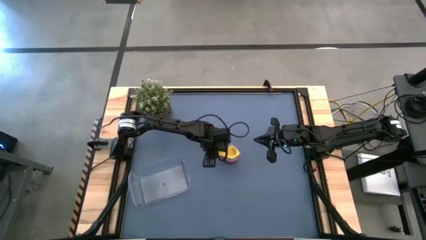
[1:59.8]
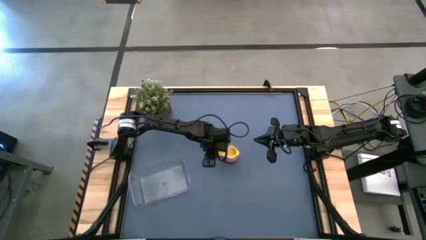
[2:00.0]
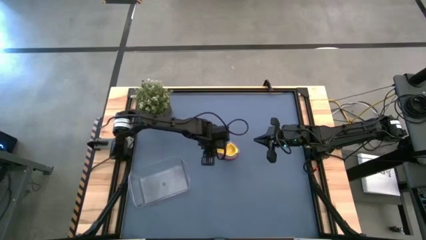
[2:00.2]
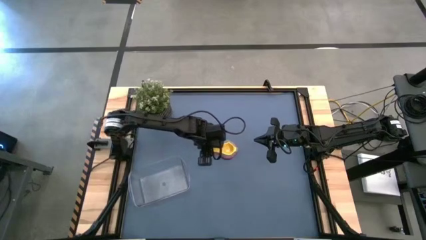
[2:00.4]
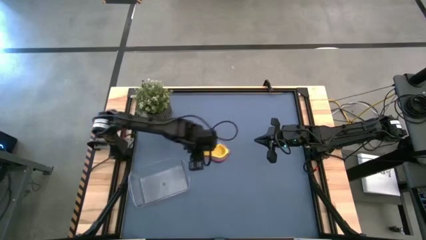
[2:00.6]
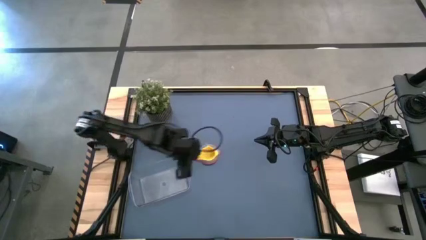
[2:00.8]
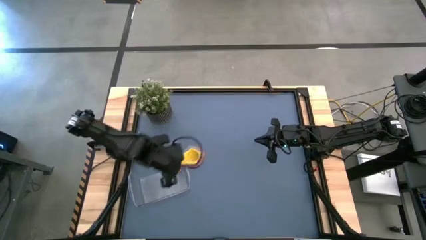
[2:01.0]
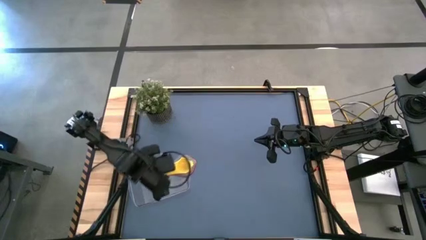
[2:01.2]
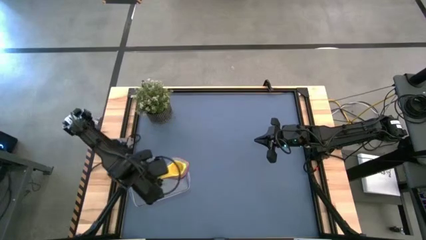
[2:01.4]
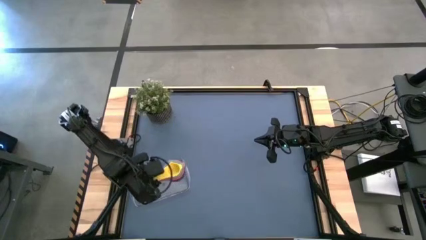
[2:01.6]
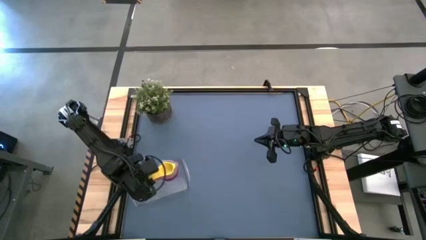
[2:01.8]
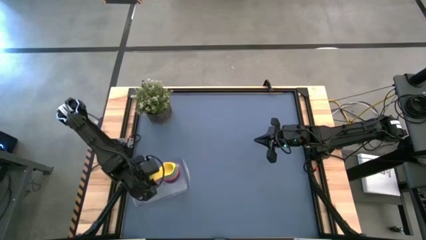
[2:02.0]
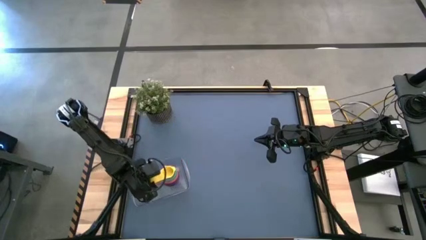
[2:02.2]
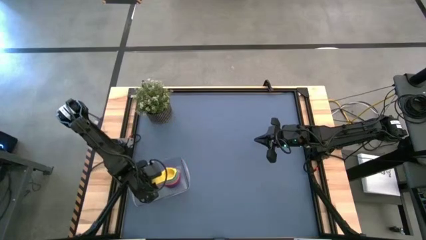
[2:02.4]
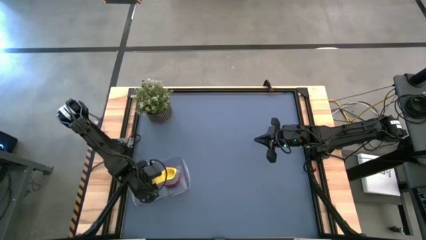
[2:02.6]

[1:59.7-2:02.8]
Task: Nest measuring cups in basket
Put the stacked measuring cups into the transparent bin

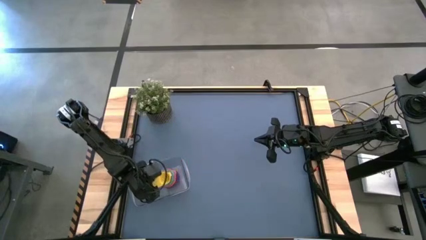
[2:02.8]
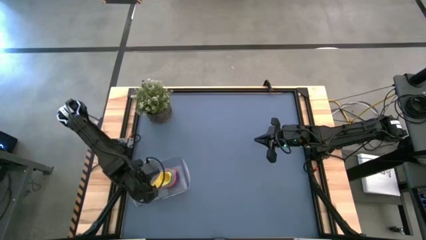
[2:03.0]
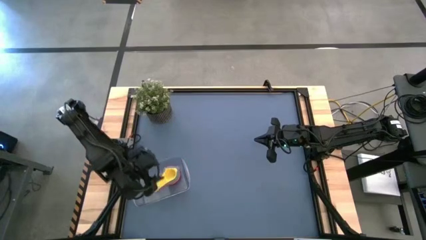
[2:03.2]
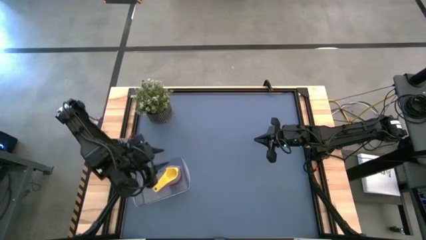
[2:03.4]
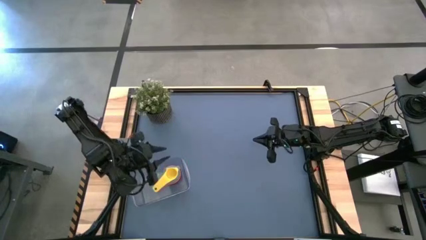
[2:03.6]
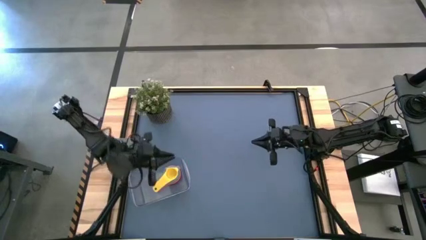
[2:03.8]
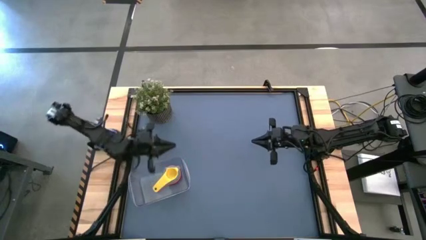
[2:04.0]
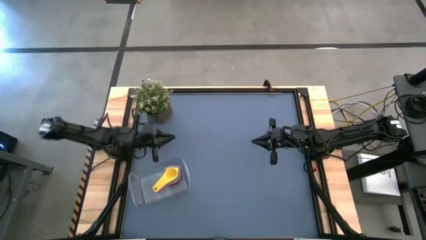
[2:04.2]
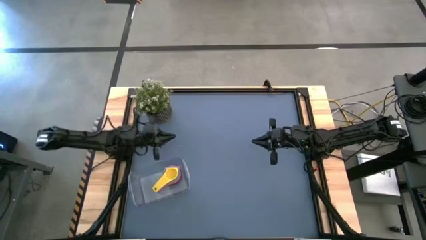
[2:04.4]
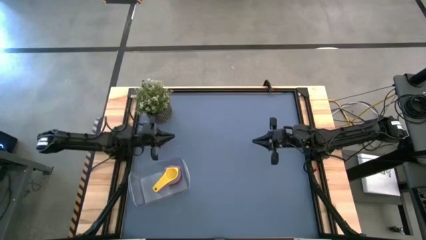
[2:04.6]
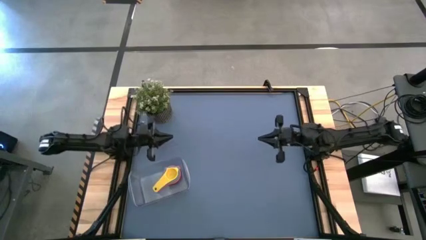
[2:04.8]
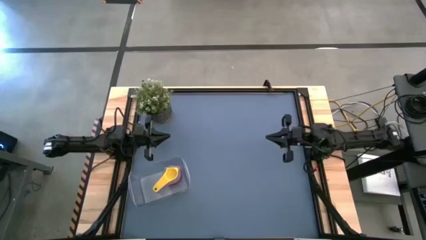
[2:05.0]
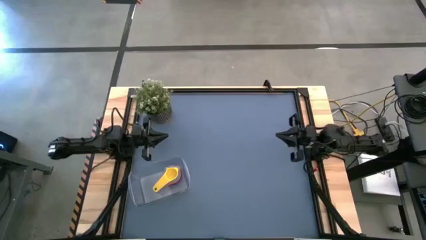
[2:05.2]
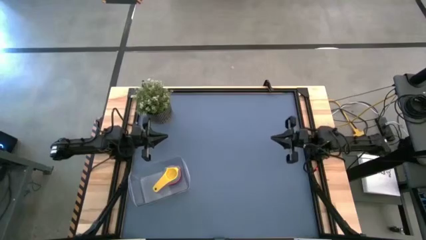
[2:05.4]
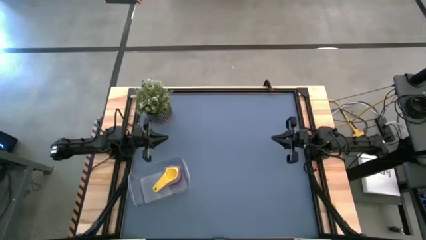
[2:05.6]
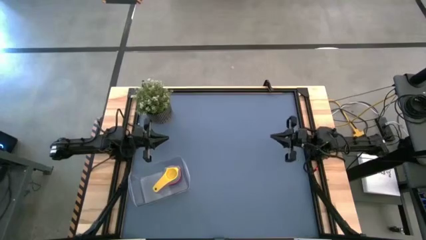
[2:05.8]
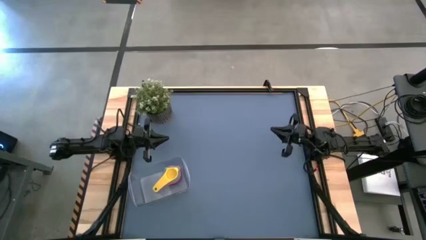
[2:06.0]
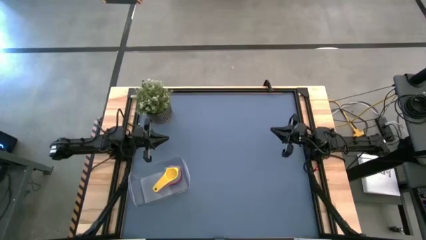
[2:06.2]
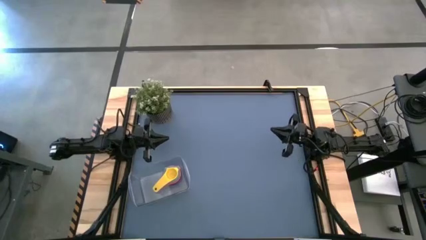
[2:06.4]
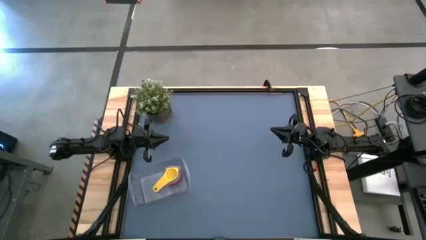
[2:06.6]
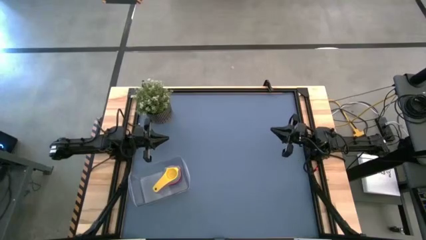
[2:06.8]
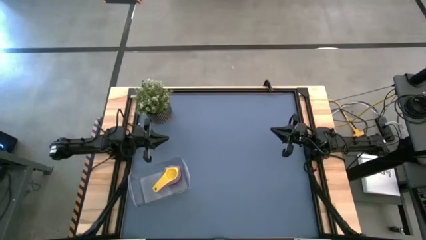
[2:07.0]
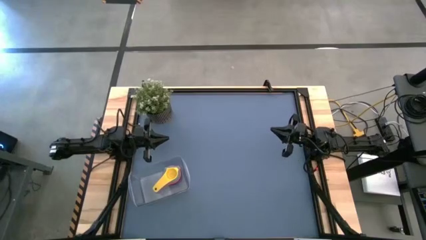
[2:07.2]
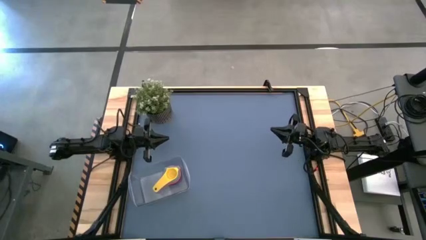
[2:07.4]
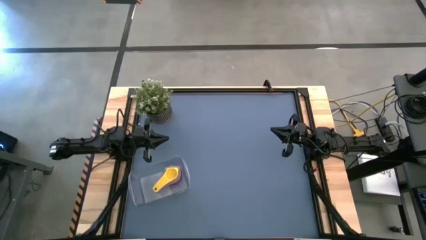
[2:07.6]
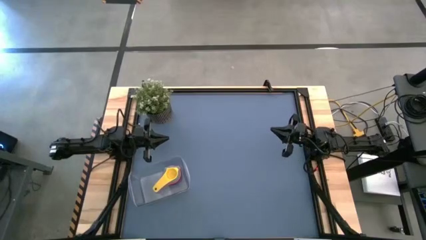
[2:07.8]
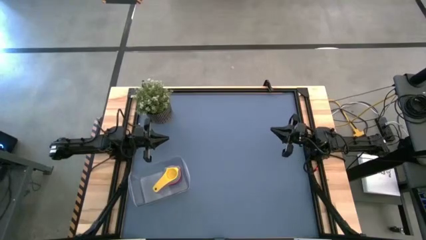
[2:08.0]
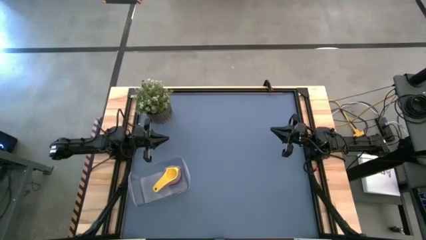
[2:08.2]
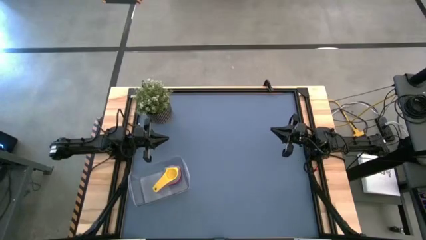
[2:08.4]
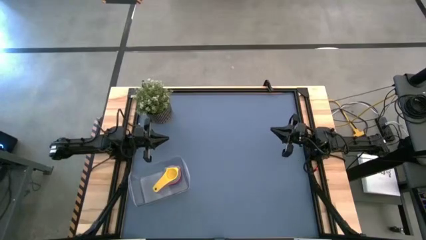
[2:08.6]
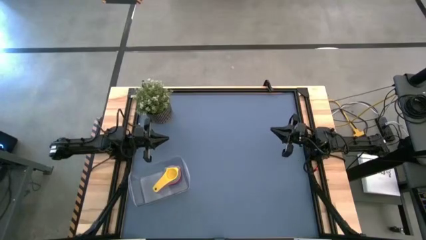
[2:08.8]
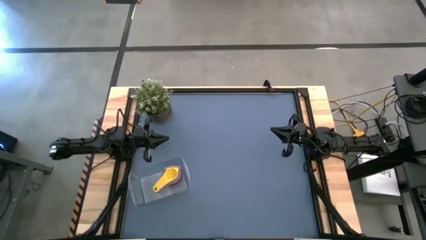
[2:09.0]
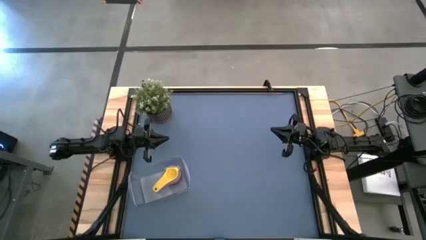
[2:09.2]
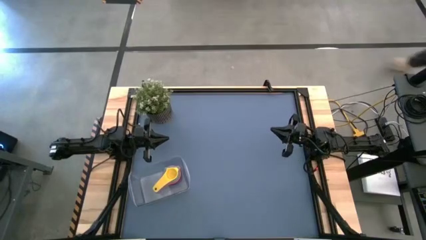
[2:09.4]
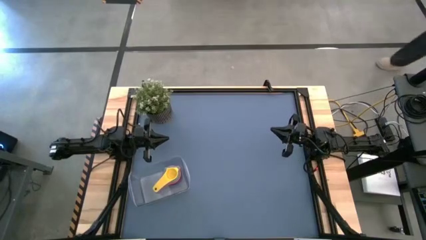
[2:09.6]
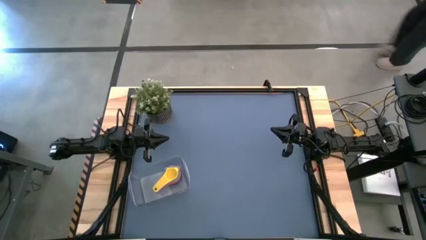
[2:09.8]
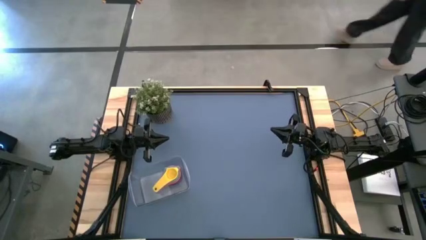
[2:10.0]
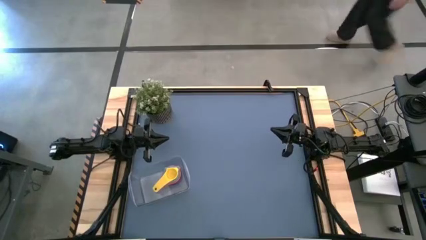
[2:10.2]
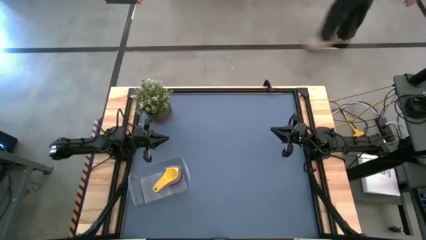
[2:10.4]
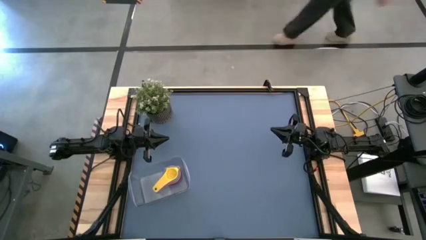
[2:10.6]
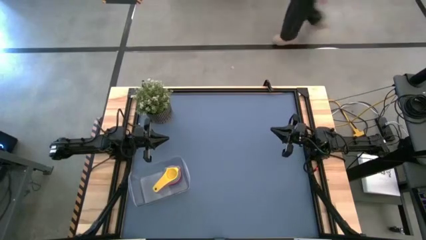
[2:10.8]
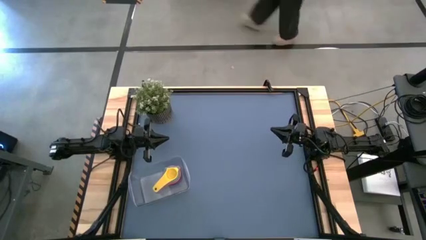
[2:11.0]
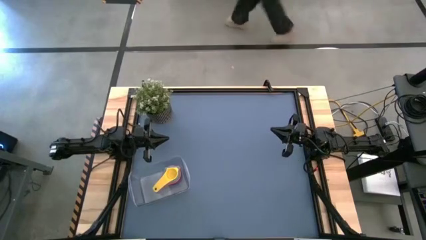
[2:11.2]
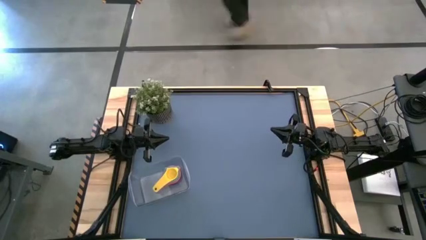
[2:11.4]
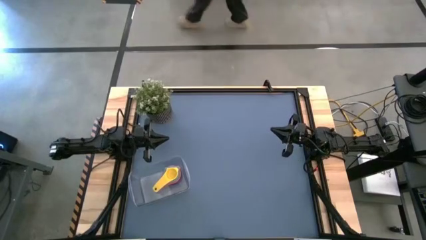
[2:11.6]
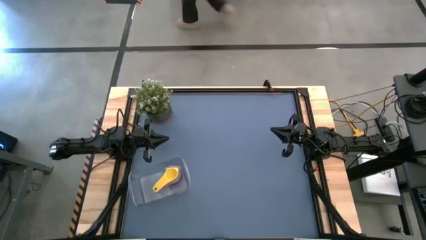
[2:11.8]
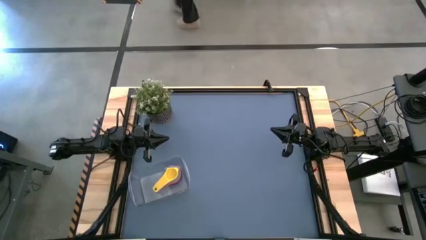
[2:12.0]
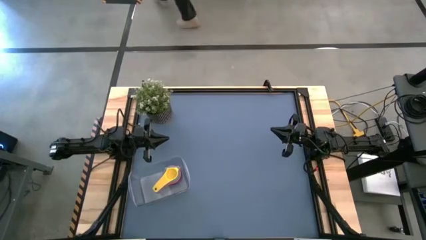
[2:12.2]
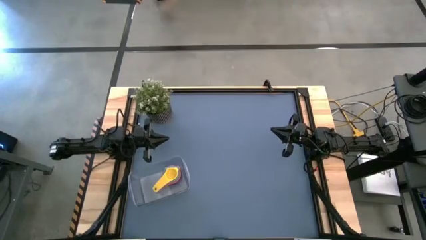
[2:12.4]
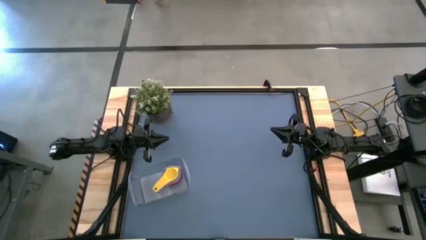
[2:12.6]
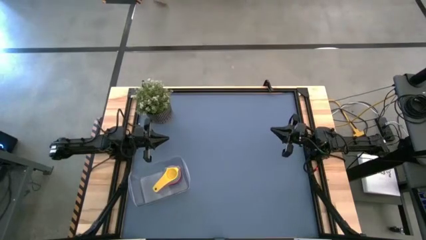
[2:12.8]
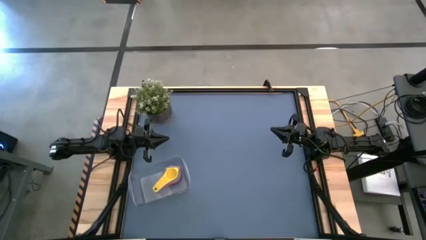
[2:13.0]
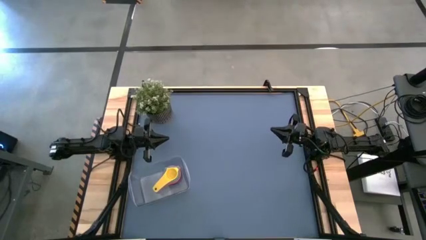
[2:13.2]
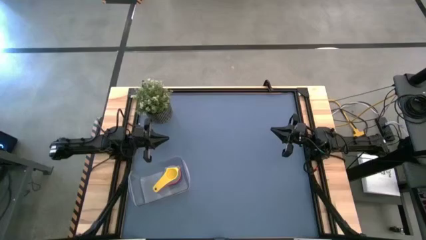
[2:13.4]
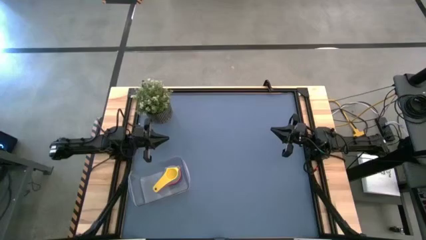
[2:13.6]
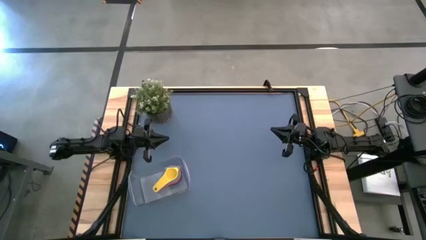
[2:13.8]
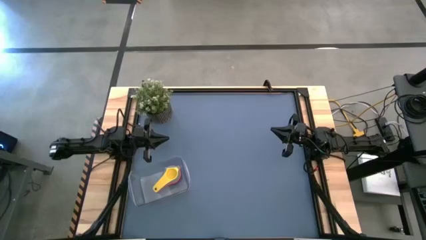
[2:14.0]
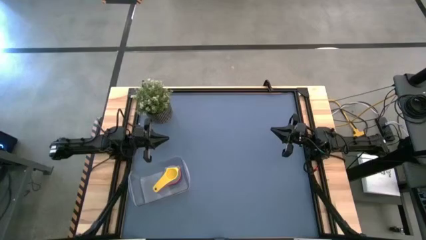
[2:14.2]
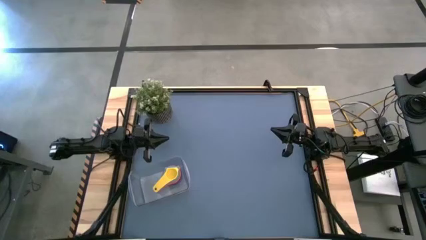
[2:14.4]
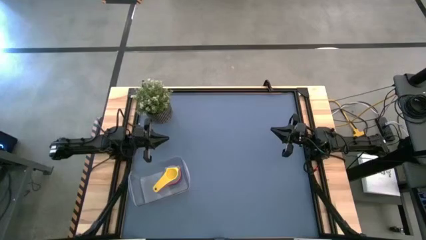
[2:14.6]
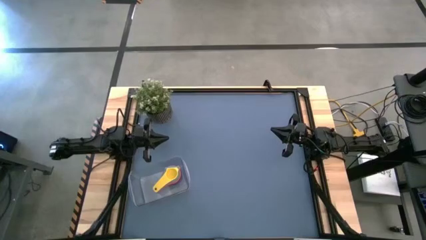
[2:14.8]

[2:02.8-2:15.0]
Return to Home Position
